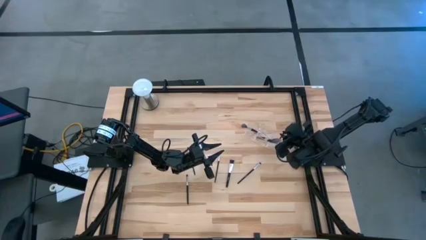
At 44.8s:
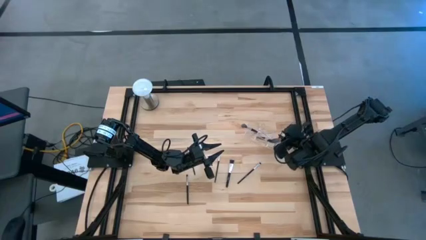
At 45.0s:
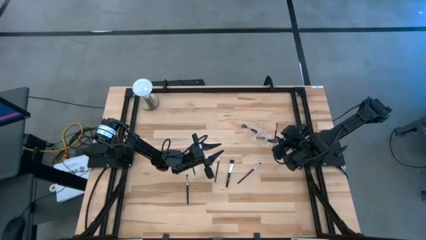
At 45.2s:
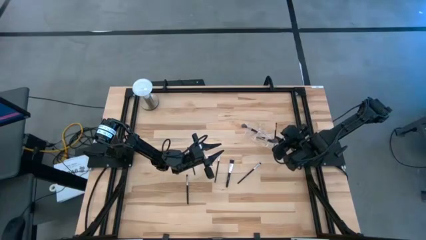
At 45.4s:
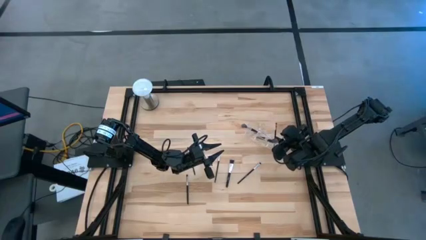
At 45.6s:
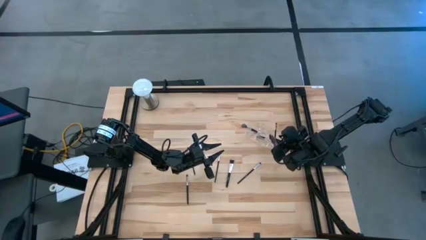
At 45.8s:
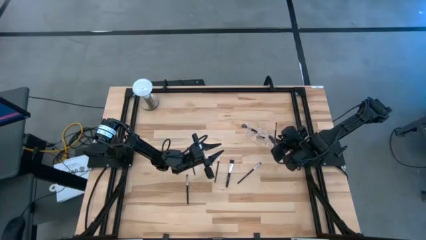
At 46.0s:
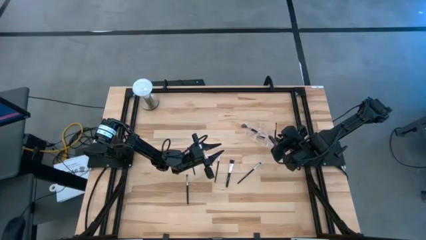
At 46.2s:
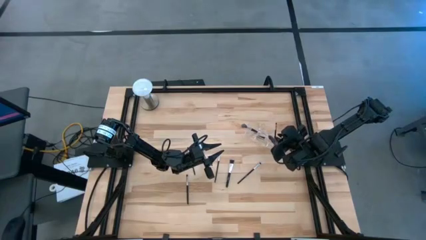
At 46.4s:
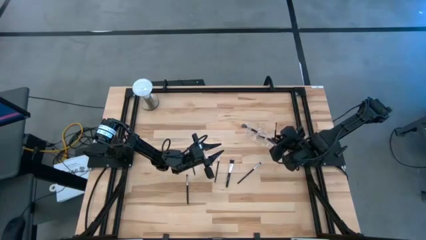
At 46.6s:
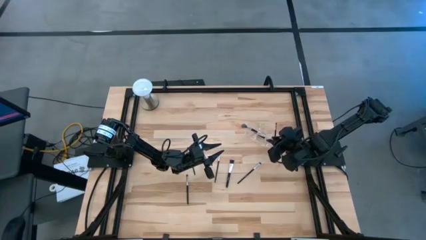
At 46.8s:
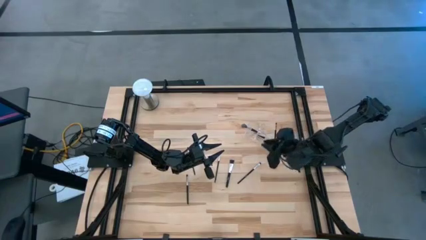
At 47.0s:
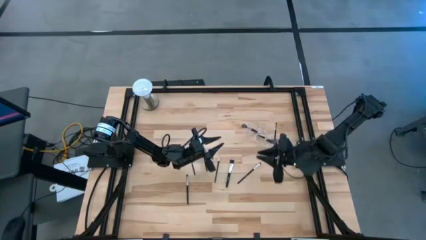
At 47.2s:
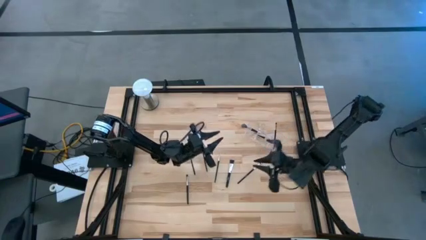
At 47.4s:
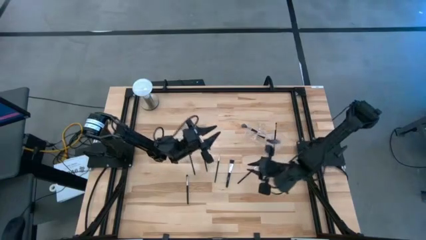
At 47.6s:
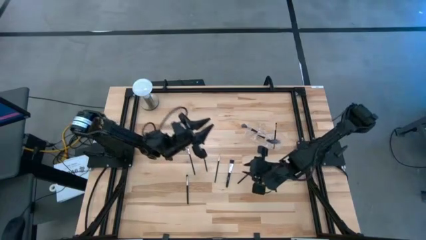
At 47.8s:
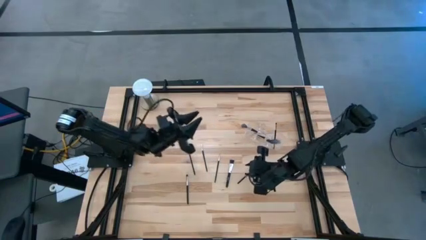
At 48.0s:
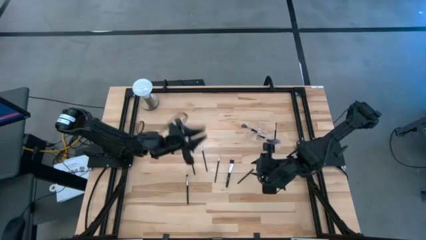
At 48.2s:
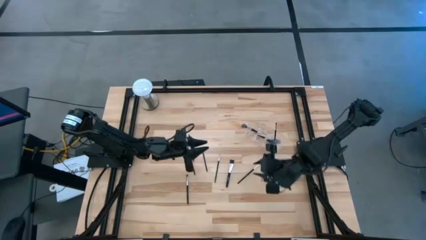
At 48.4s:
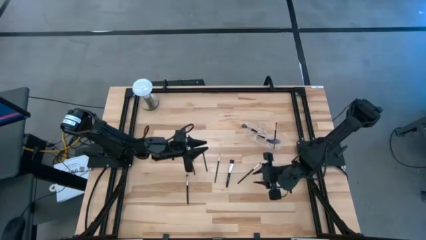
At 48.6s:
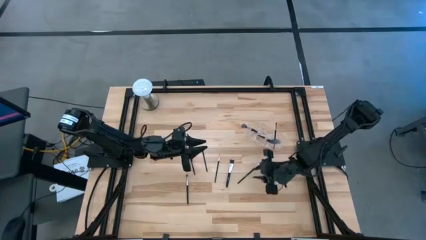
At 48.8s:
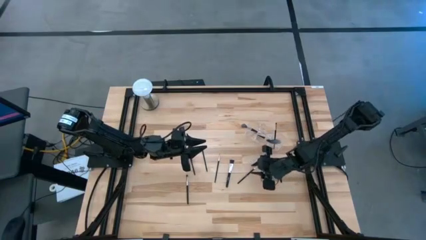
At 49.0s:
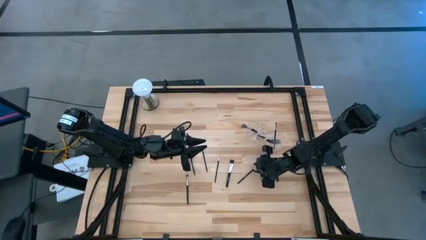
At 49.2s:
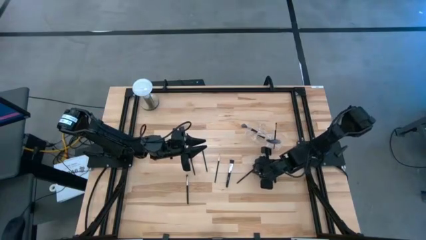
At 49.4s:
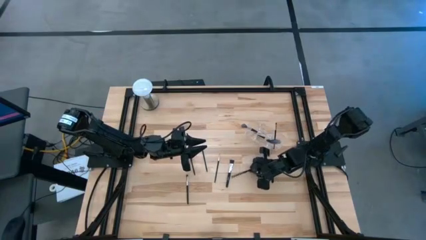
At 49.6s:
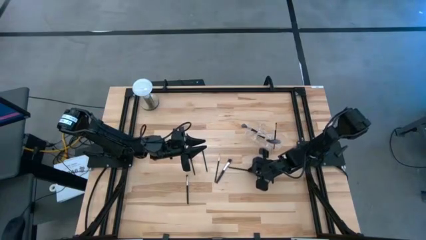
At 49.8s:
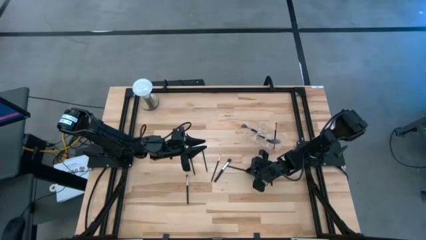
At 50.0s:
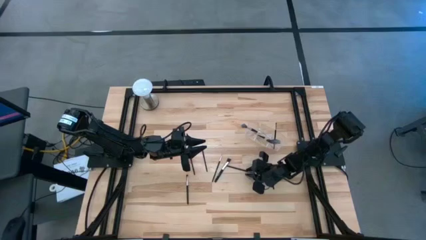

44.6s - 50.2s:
Task: Pick & Place Makeup Supplies
Put the black makeup brush into the transparent organizer

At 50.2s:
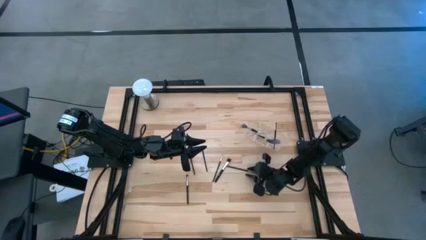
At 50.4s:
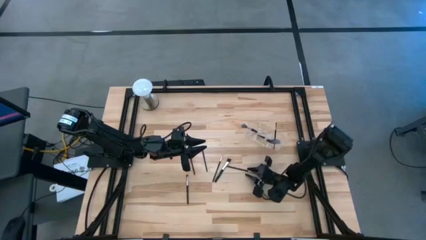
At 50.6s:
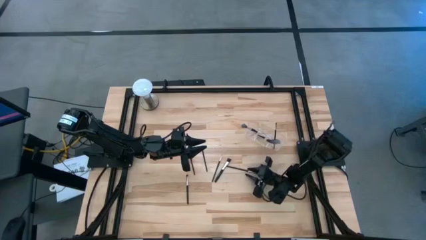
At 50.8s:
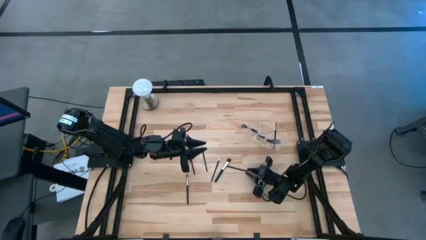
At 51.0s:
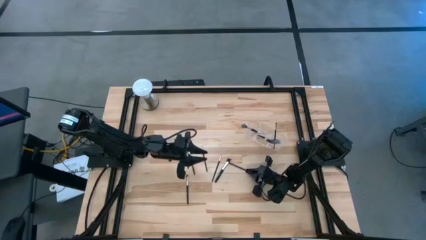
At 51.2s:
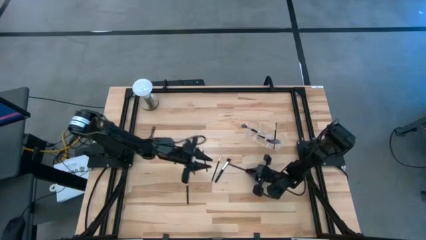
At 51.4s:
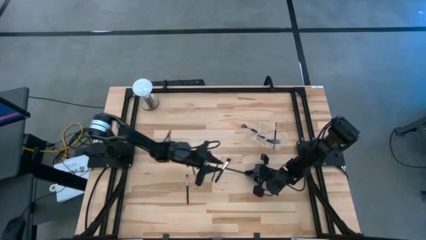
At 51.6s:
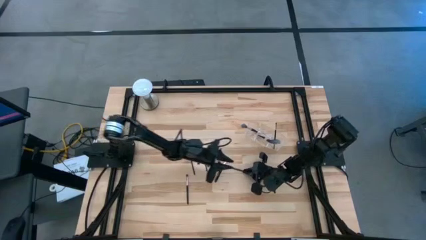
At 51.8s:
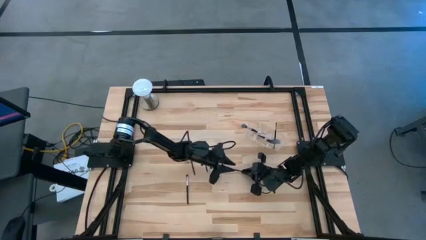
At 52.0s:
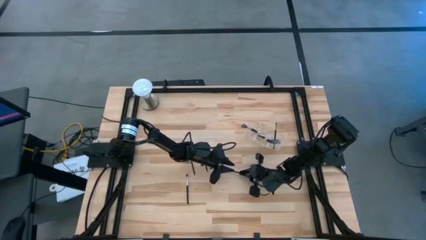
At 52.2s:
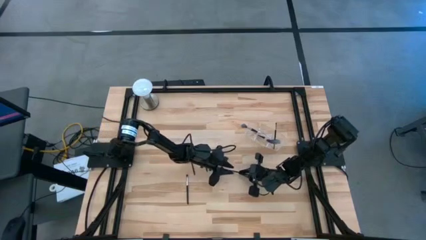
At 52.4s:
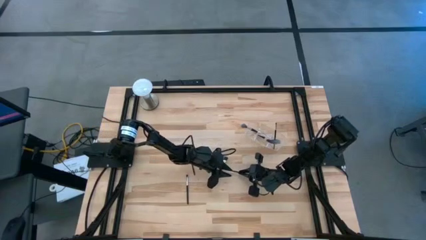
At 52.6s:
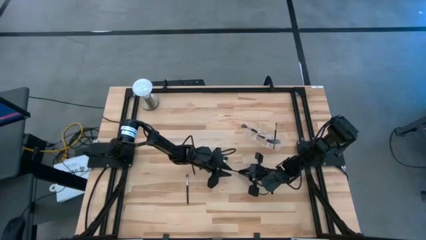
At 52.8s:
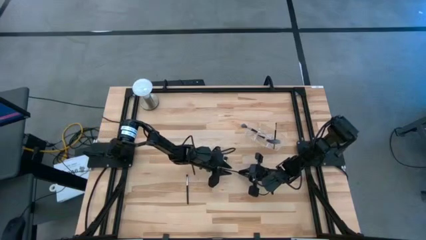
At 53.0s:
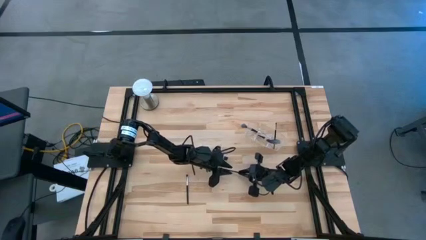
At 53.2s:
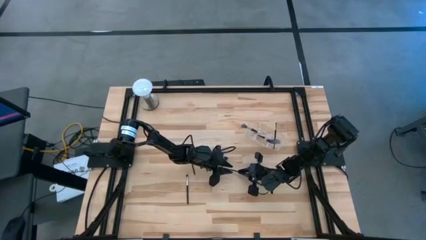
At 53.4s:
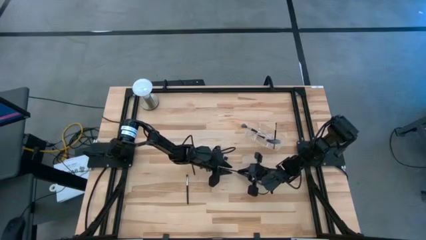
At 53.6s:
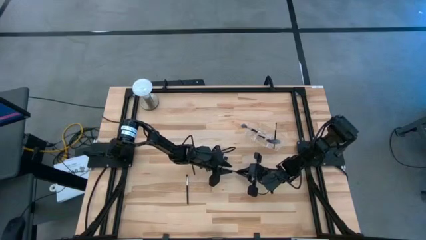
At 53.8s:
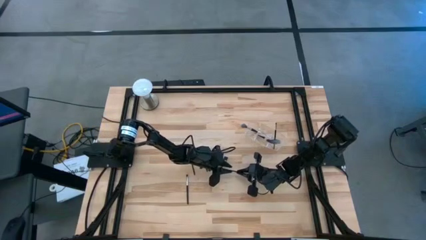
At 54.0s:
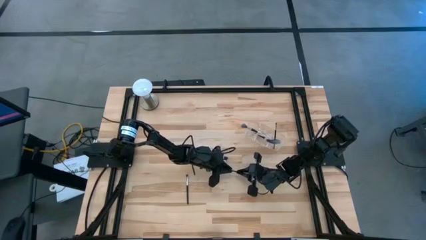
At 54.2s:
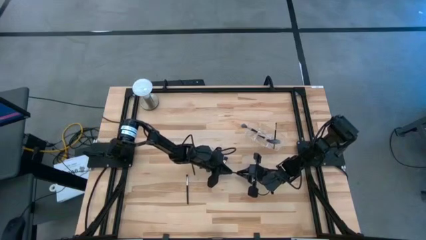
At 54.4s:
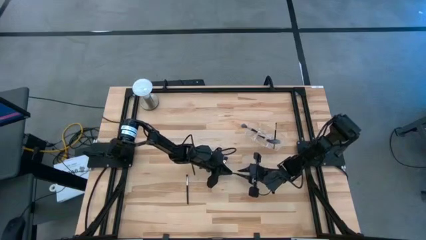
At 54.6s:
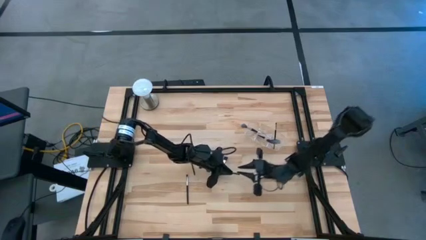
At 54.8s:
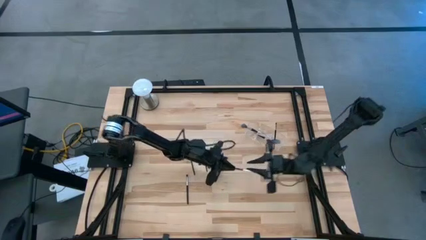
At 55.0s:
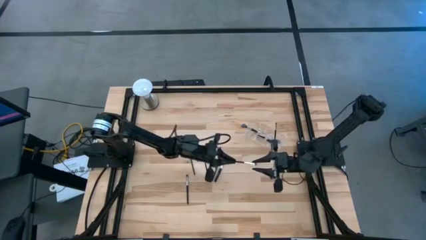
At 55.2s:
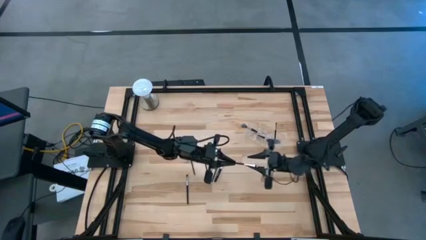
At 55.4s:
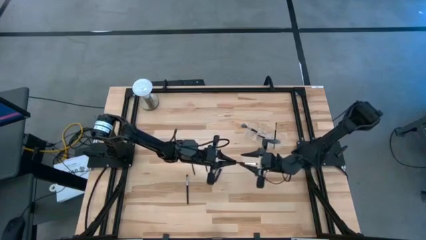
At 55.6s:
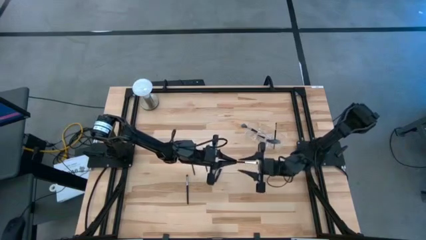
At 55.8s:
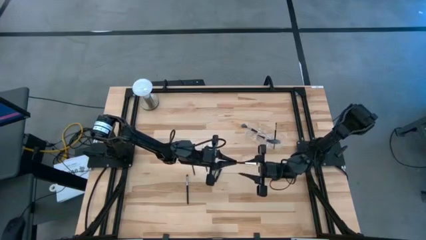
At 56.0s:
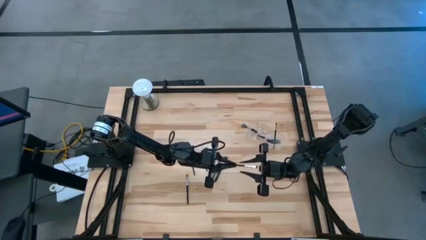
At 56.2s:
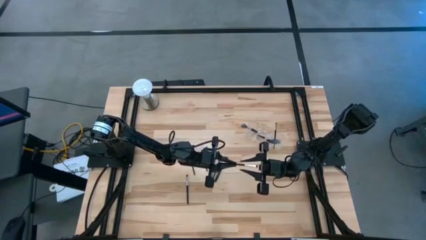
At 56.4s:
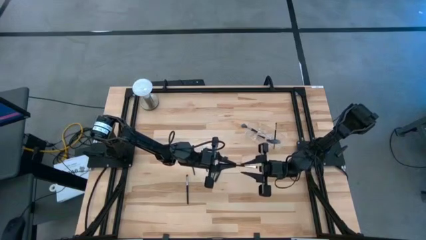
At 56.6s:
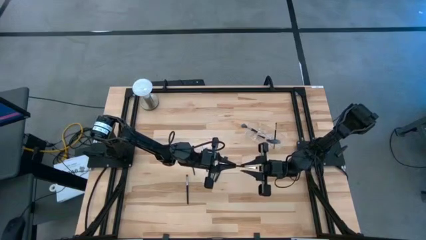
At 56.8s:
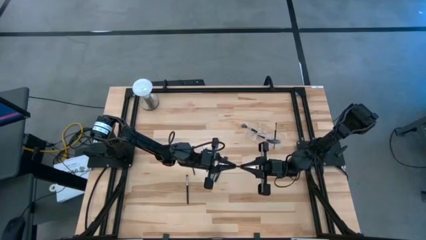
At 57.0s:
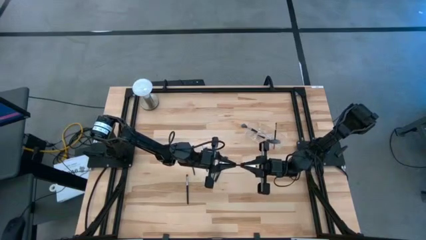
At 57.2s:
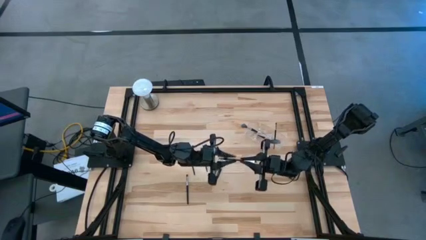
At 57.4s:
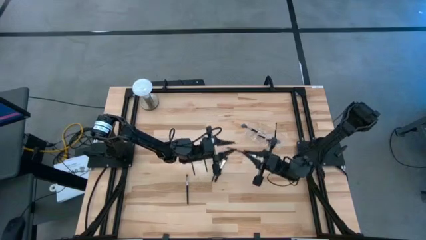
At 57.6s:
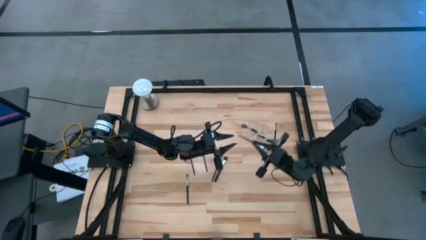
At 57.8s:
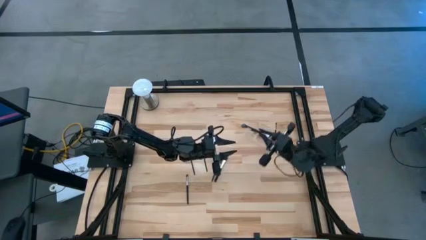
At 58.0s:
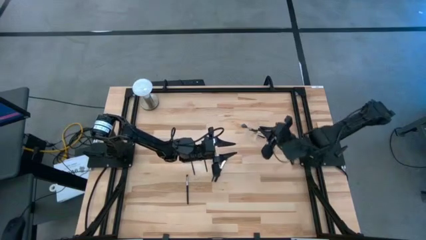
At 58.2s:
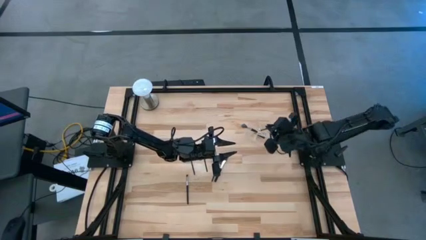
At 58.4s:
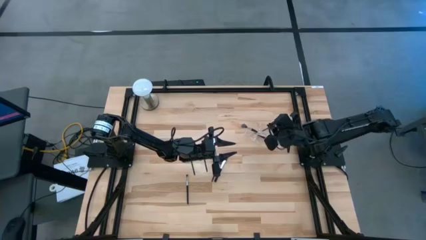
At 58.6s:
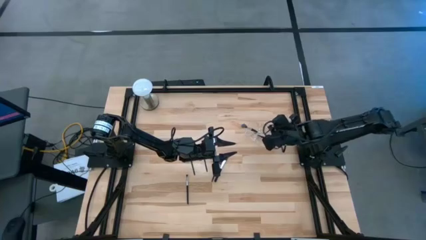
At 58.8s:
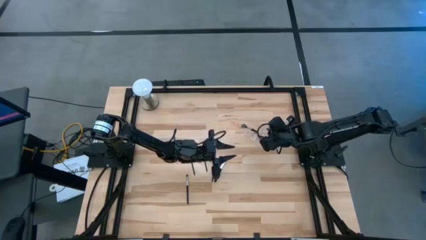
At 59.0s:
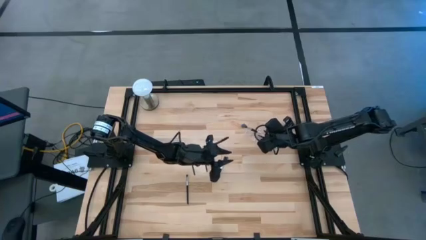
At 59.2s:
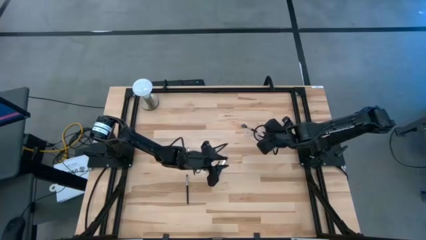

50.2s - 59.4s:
Put the black makeup brush into the transparent organizer

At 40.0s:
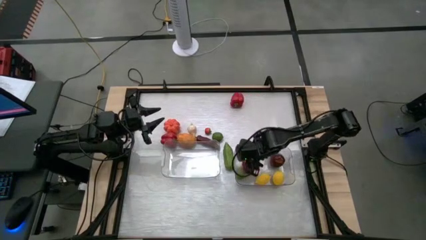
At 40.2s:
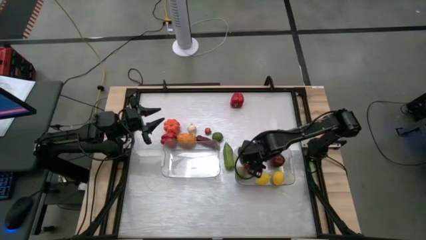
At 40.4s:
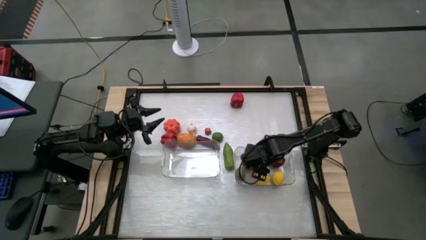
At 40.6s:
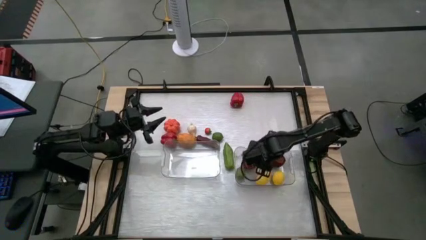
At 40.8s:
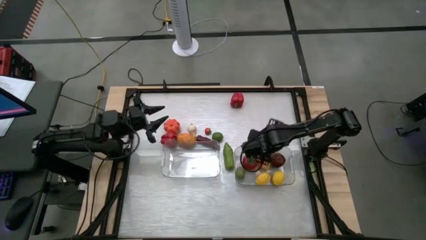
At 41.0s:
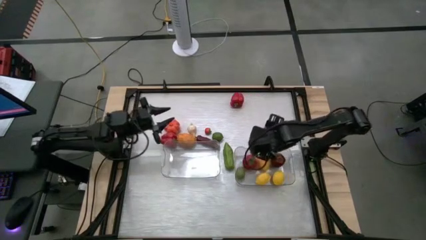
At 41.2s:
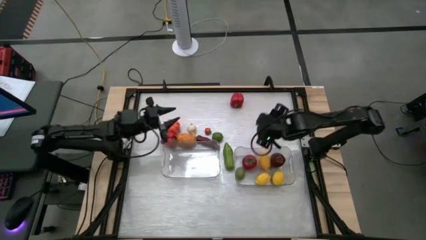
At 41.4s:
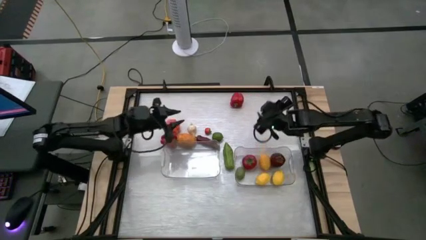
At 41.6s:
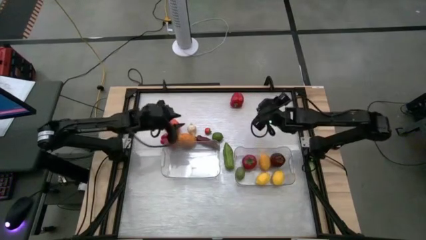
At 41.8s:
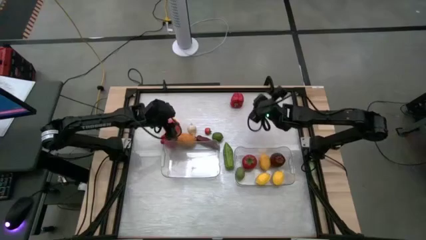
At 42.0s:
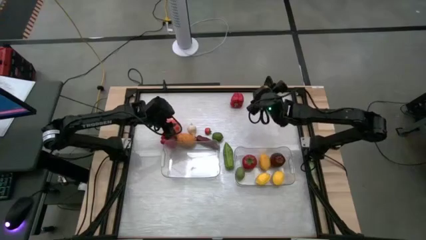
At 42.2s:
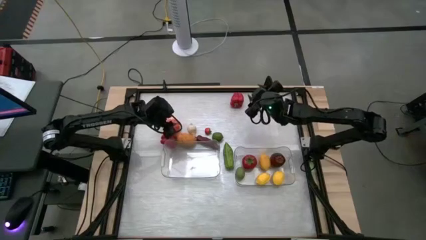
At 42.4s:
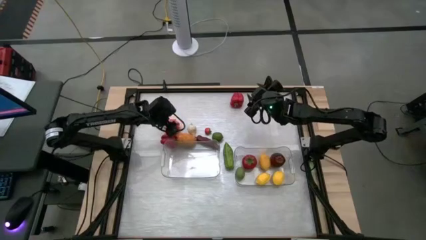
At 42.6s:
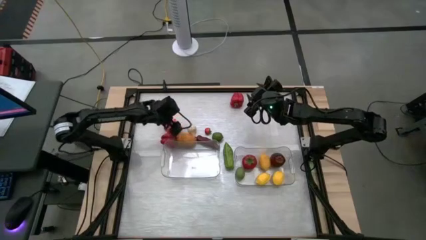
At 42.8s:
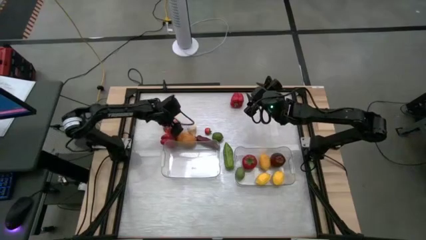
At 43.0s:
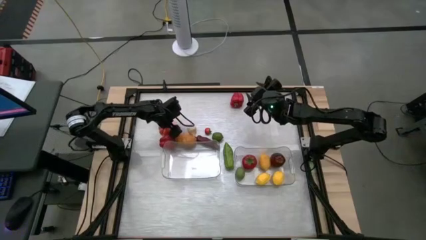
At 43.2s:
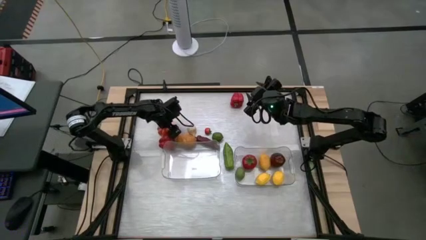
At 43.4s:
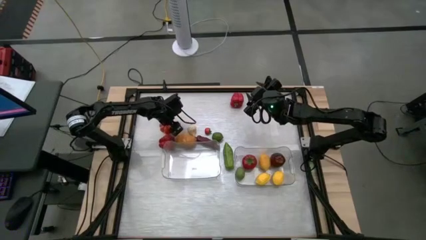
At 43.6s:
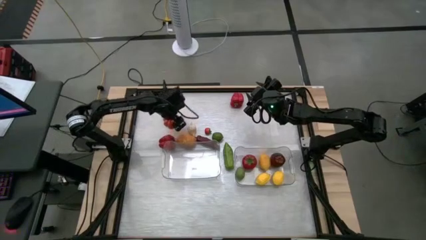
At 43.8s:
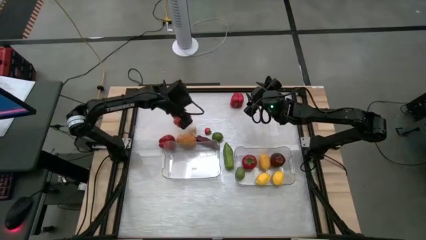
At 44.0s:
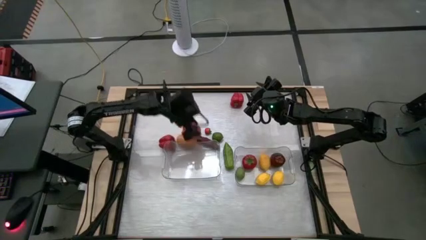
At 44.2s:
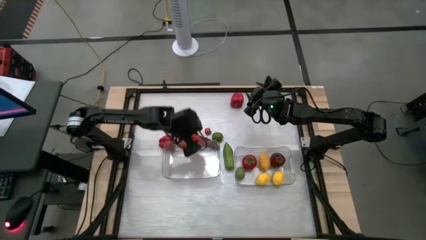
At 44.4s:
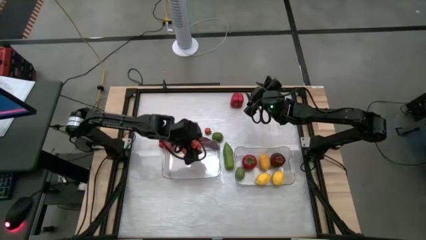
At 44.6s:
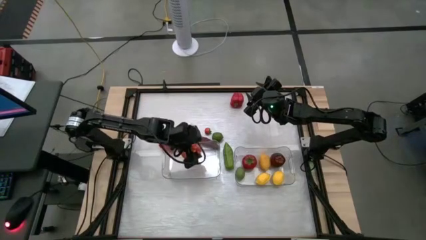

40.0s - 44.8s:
Task: Sort produce into baskets
Put the pumpkin into the left transparent bin
